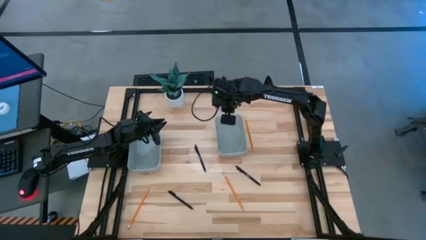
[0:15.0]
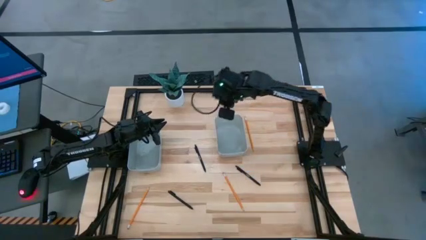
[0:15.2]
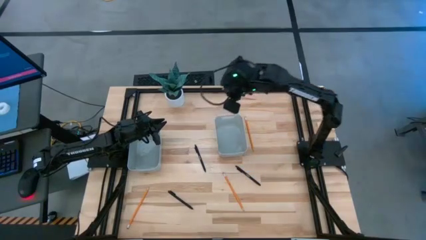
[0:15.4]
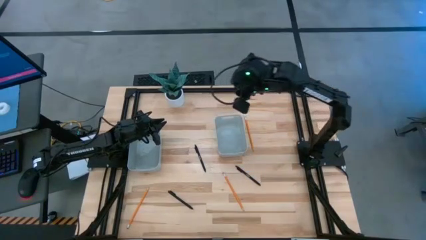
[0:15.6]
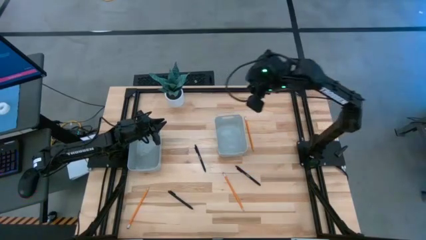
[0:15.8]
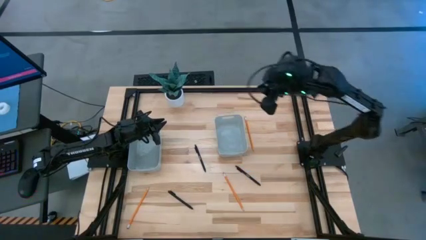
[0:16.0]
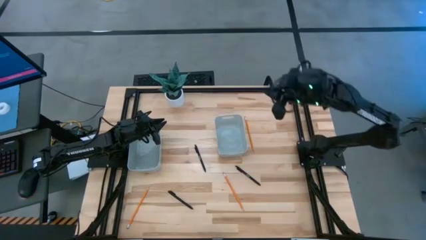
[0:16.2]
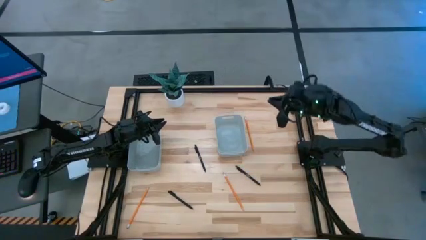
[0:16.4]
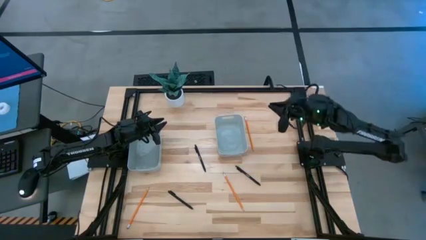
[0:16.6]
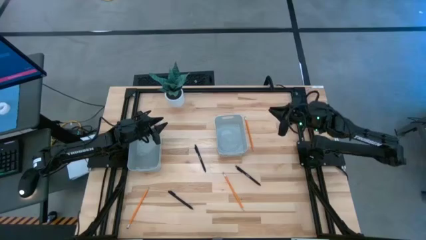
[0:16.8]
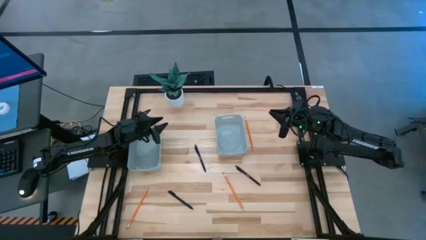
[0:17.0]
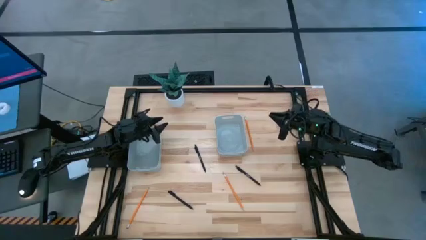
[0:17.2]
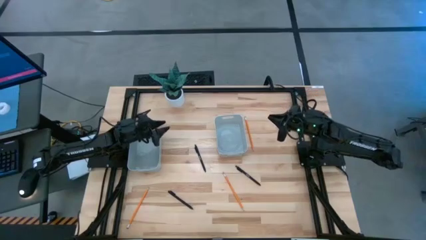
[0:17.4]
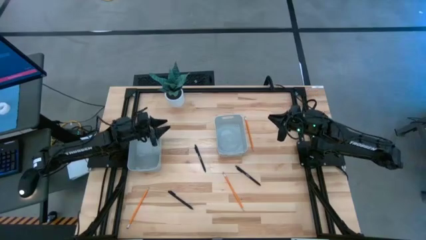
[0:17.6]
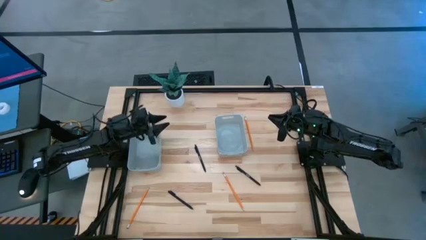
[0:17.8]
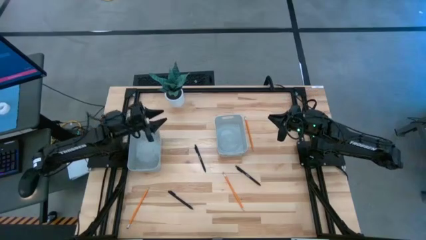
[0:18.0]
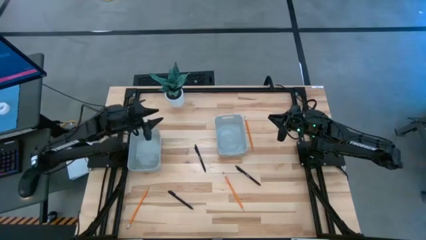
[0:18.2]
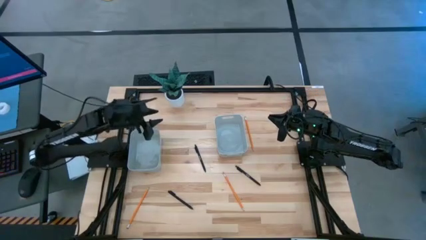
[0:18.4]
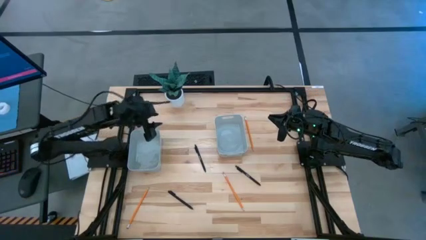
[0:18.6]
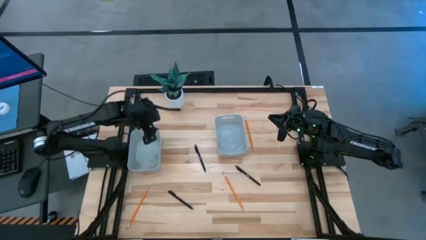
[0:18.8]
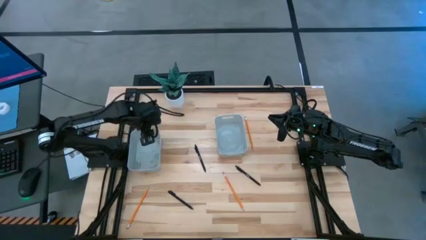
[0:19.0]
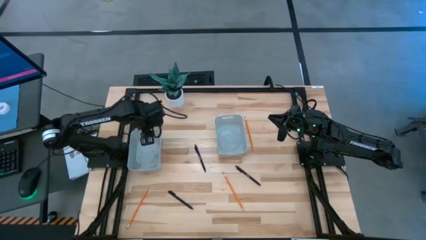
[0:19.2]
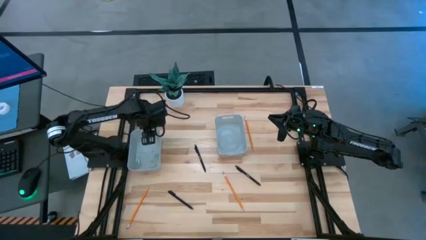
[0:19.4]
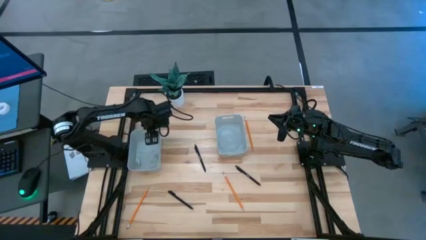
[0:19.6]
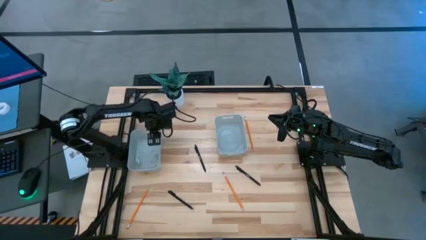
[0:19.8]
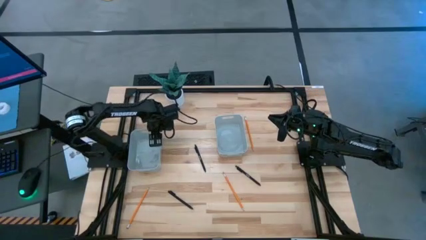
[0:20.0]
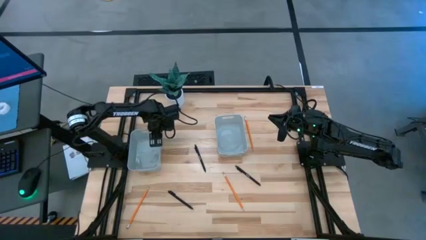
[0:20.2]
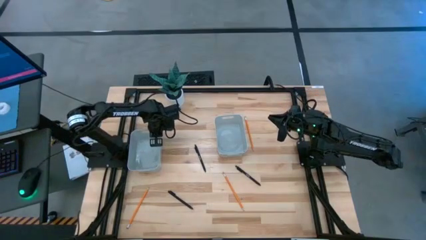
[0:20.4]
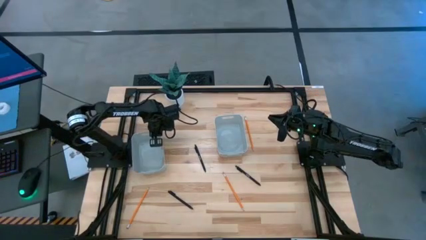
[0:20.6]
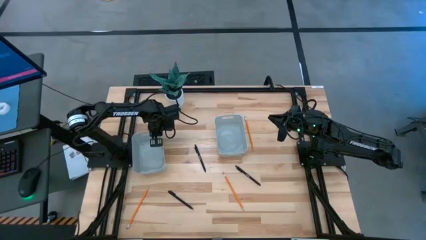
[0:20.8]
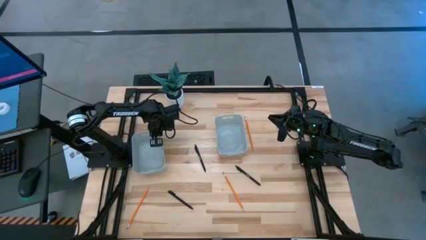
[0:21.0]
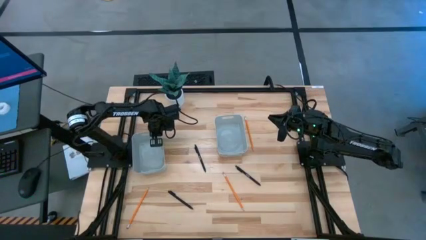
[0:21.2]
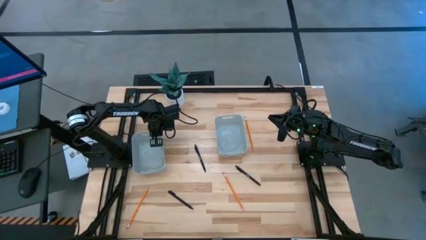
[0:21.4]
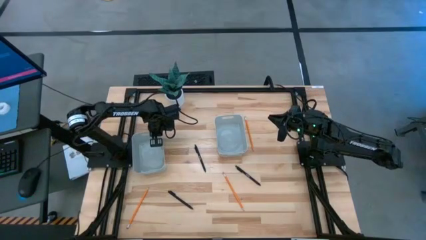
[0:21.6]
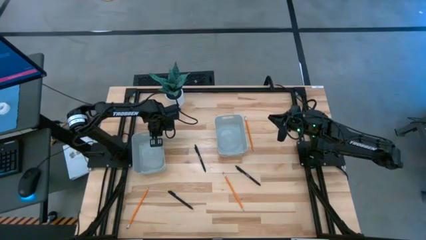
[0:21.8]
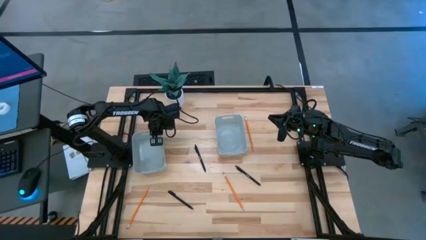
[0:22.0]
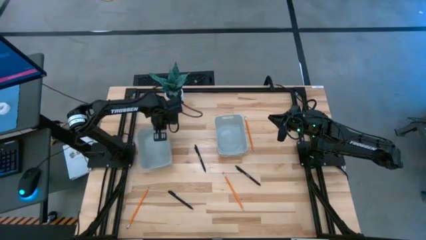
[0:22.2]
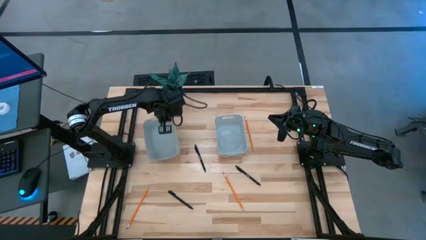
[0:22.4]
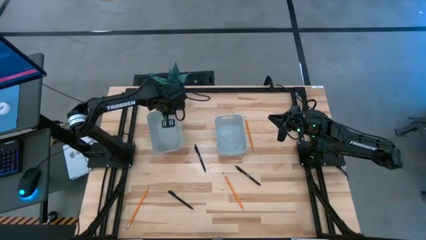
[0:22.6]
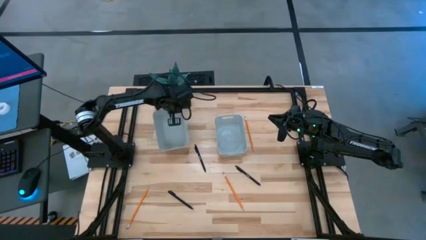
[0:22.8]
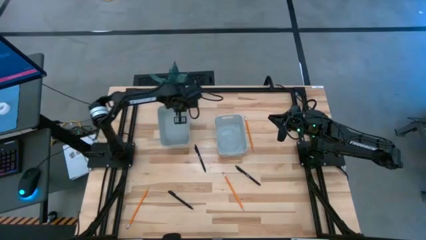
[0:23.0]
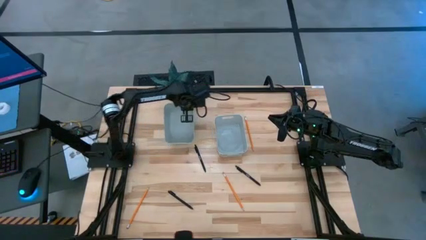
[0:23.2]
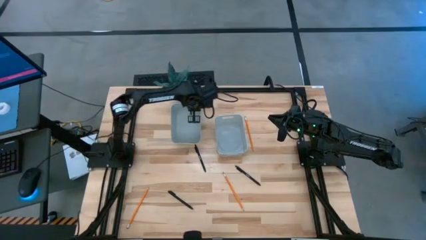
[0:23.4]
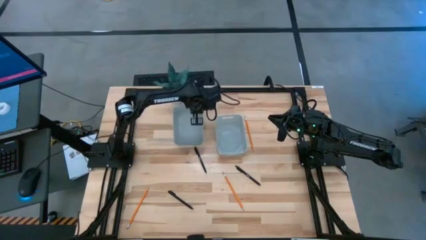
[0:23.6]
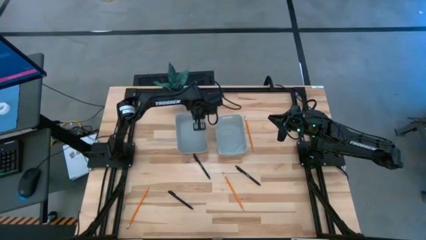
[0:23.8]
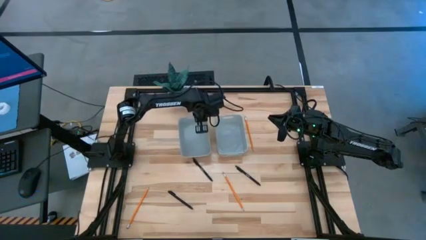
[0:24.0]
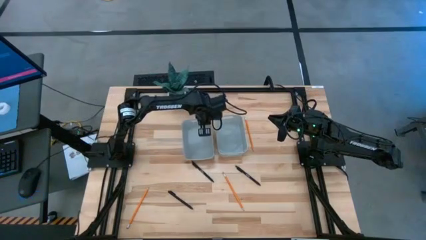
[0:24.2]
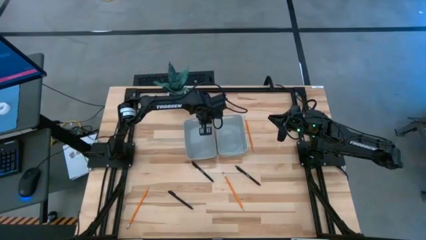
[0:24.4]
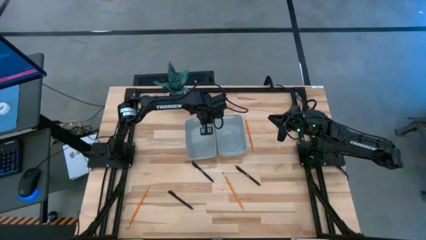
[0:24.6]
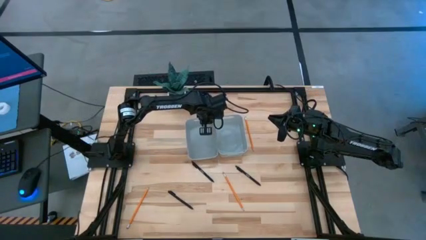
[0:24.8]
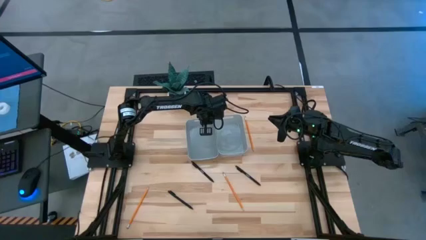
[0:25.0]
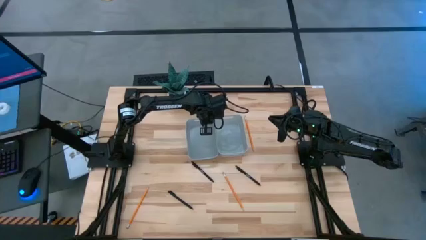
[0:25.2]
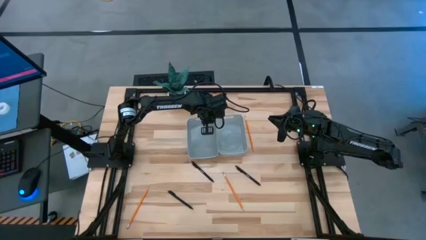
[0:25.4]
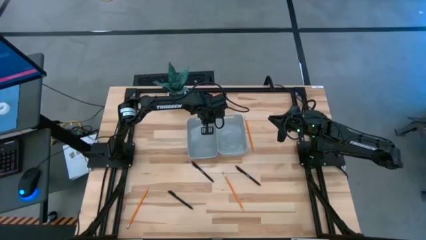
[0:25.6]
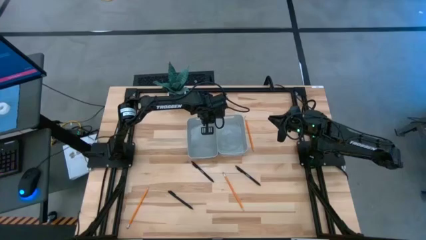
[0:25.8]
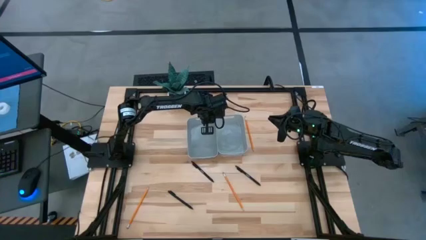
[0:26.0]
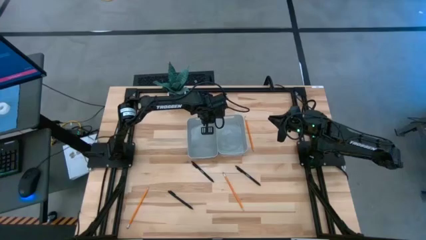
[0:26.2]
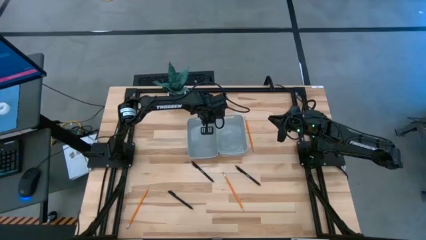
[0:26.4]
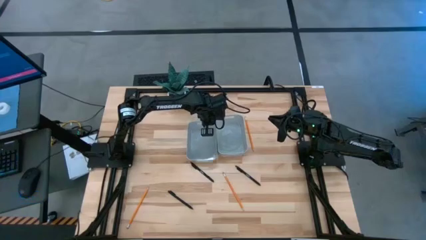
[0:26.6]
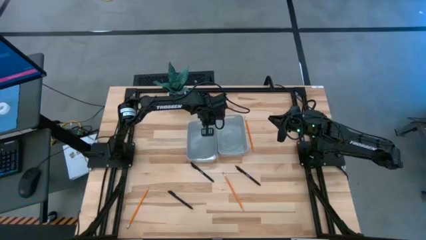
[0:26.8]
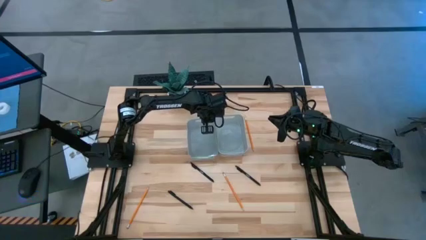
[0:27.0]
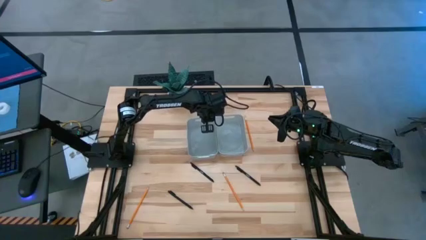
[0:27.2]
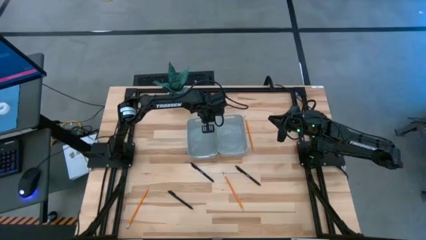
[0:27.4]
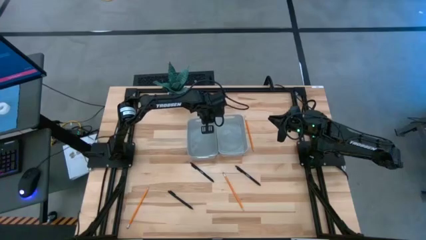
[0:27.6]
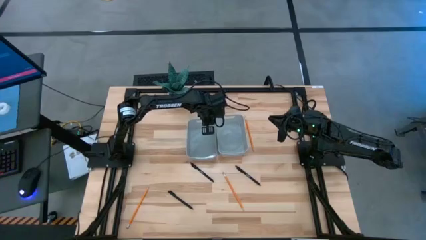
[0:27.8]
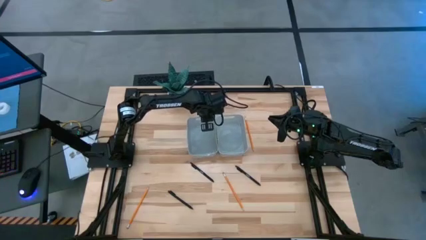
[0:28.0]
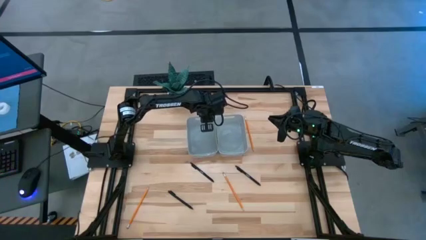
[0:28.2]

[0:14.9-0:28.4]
Task: Sort pens & pencils
Move the left gray bin to the middle of the table

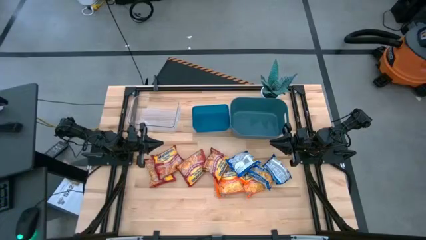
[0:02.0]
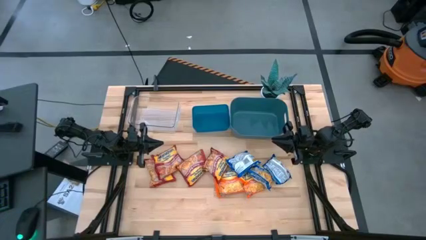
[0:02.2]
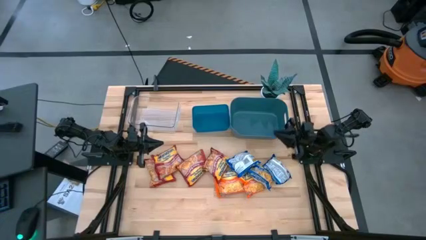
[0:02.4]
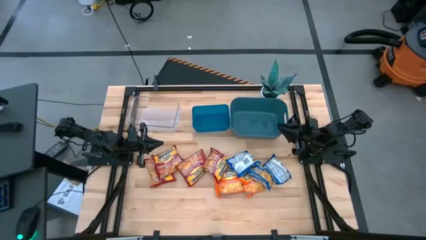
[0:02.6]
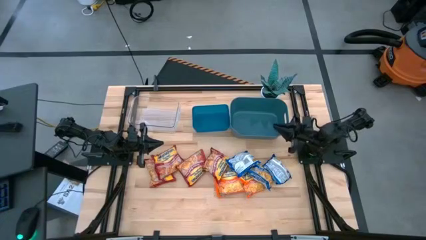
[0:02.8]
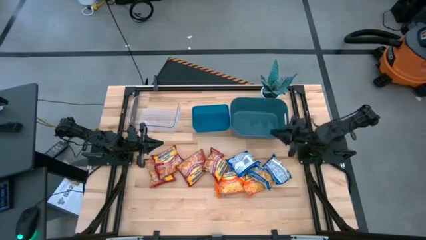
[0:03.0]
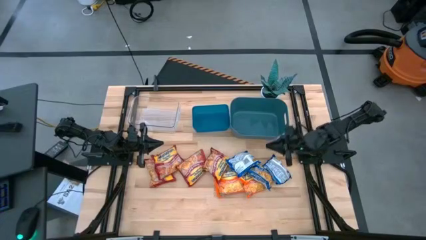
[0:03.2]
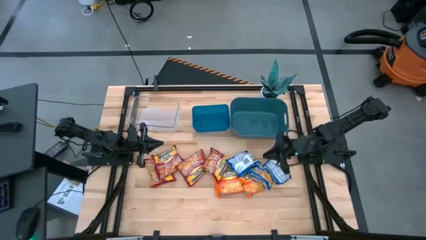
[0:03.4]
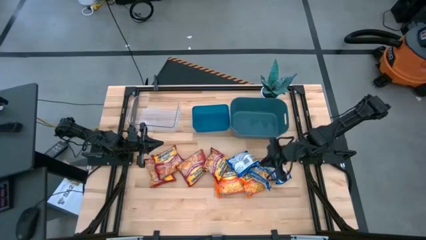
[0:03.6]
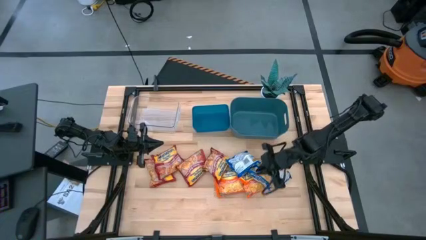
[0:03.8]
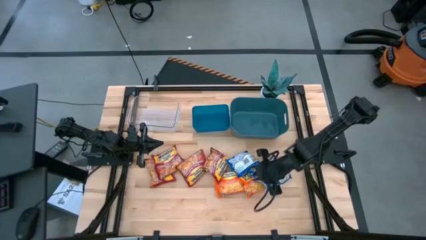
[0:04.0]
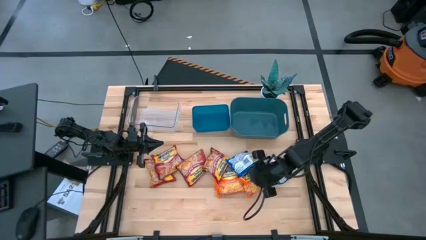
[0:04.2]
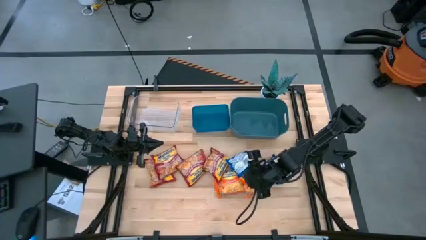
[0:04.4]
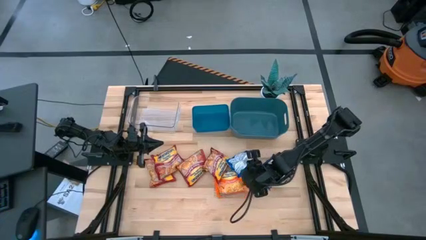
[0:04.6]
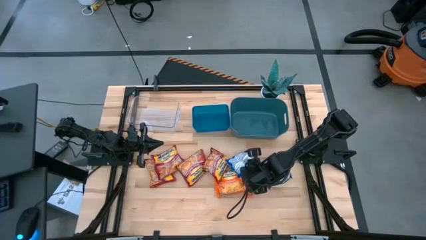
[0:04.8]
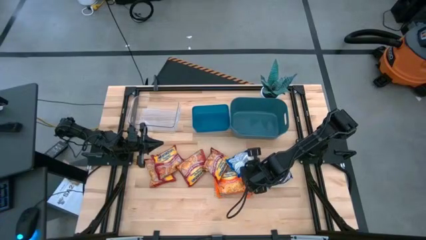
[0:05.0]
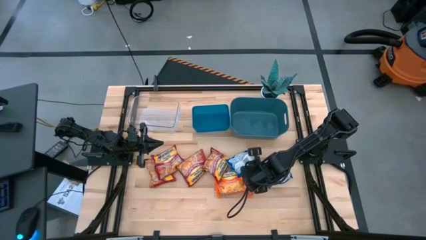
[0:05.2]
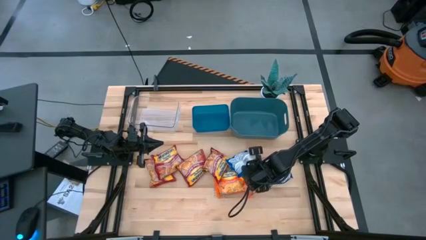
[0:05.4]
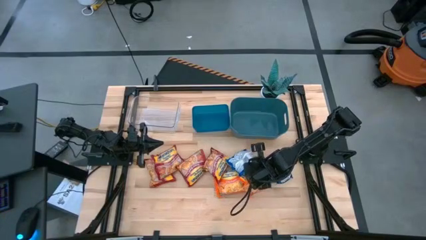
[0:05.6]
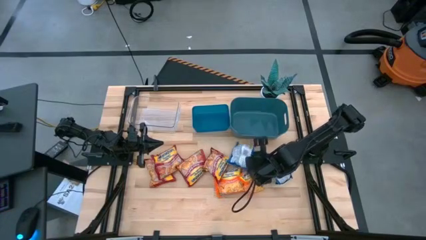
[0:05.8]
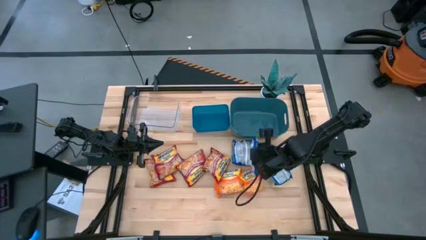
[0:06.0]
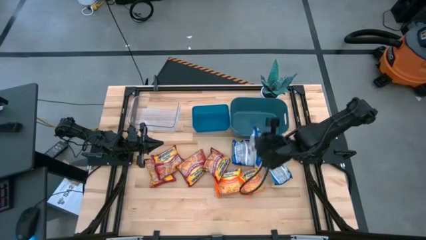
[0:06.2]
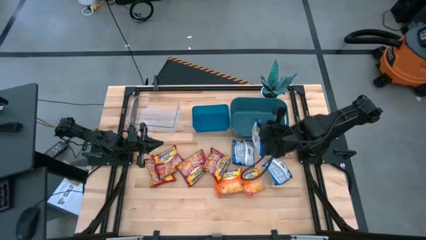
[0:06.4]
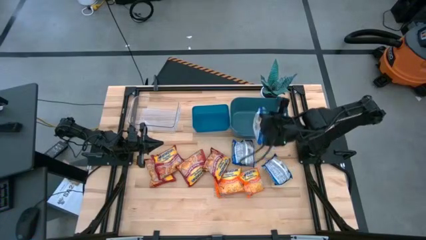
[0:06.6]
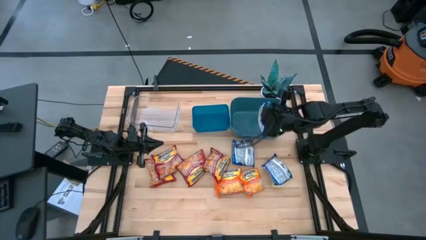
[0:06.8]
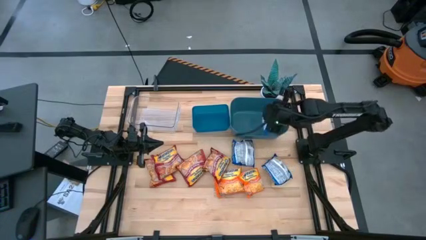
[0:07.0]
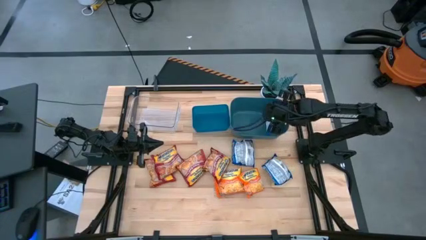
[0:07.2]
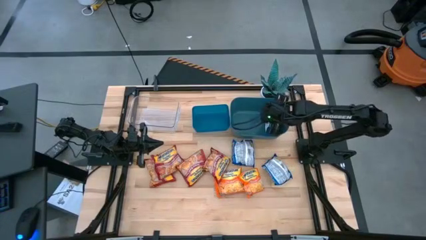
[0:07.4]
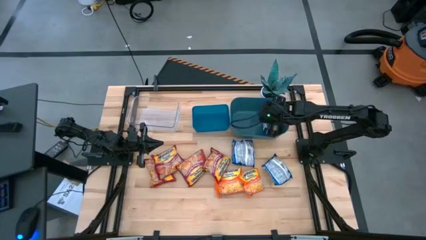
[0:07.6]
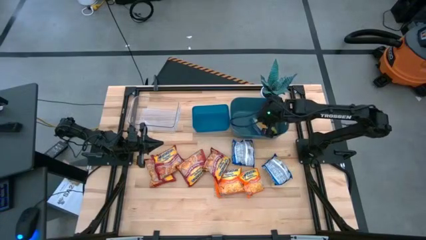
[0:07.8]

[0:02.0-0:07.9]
Task: Sort Maruchan noodles
Put the blue noodle pack into the green bin
